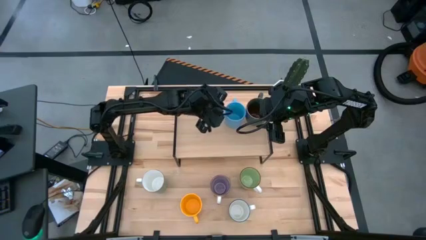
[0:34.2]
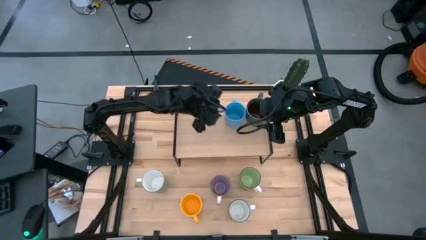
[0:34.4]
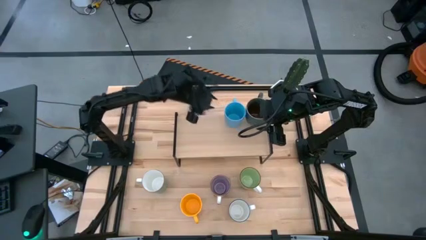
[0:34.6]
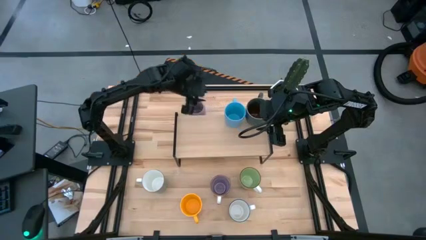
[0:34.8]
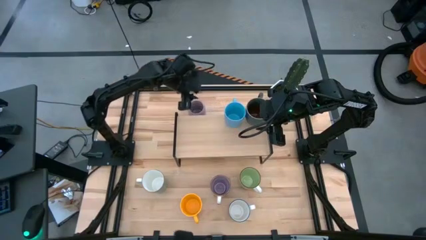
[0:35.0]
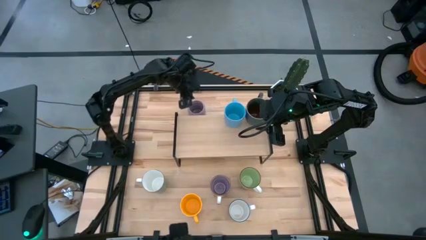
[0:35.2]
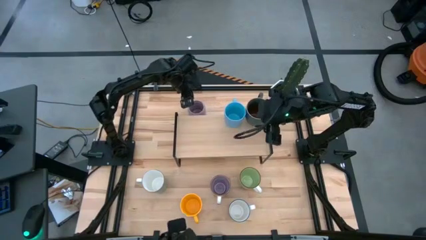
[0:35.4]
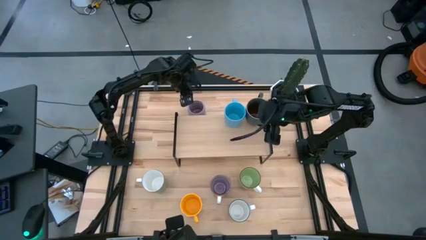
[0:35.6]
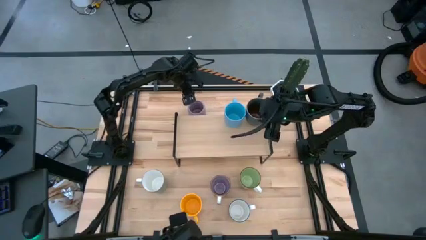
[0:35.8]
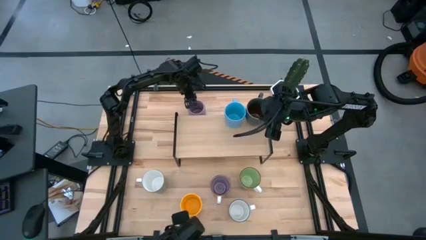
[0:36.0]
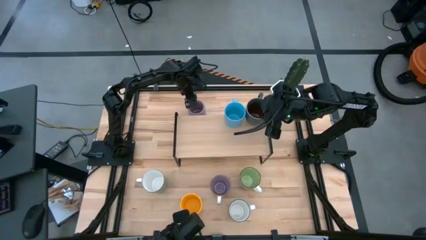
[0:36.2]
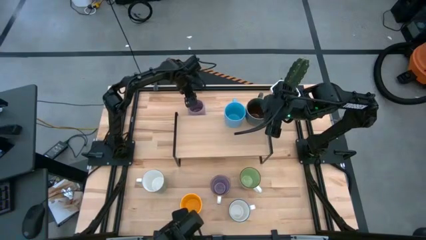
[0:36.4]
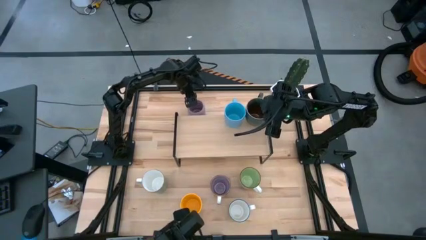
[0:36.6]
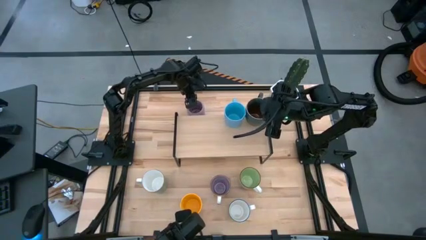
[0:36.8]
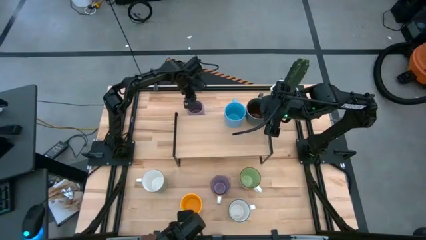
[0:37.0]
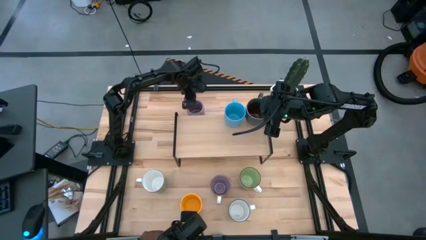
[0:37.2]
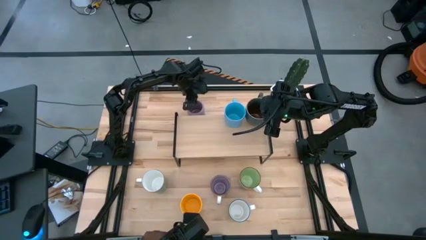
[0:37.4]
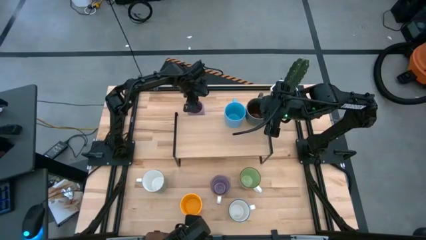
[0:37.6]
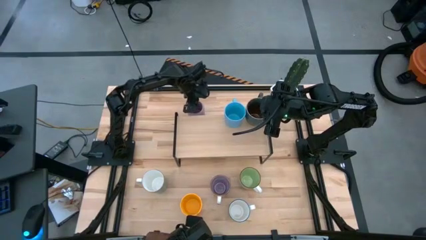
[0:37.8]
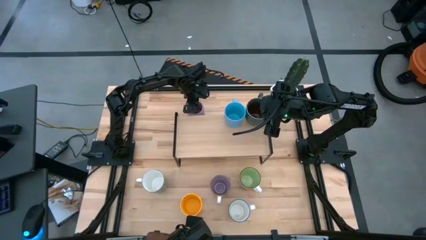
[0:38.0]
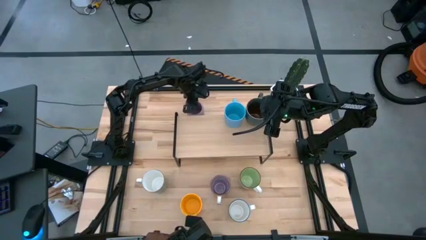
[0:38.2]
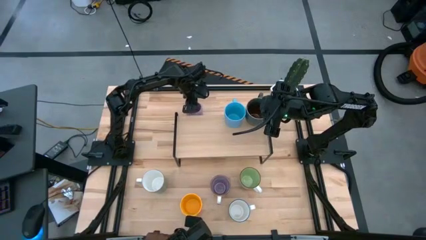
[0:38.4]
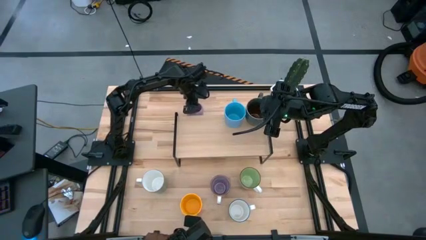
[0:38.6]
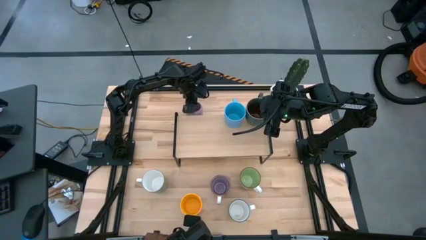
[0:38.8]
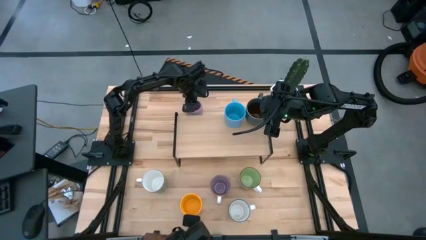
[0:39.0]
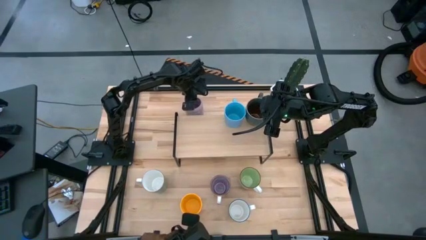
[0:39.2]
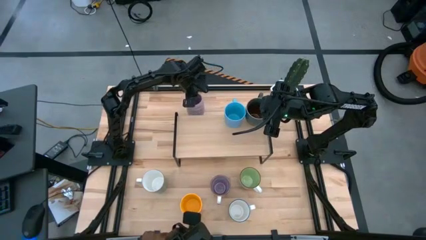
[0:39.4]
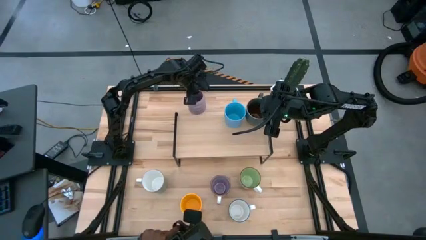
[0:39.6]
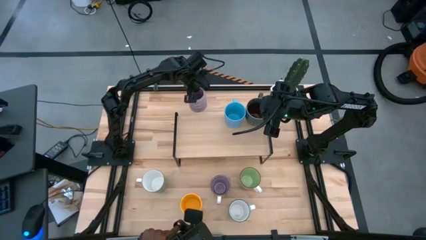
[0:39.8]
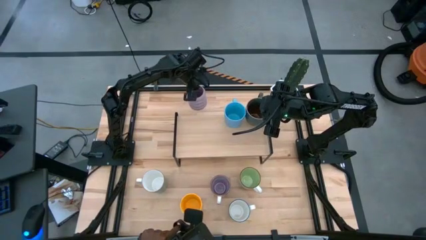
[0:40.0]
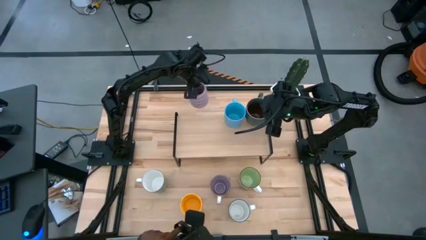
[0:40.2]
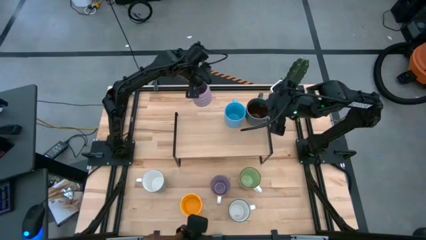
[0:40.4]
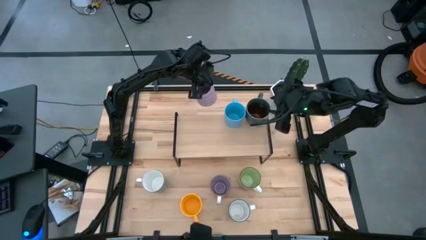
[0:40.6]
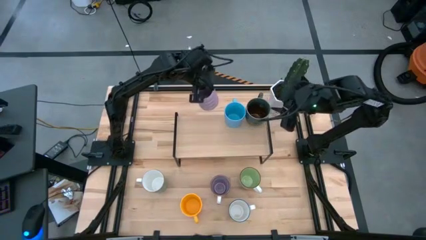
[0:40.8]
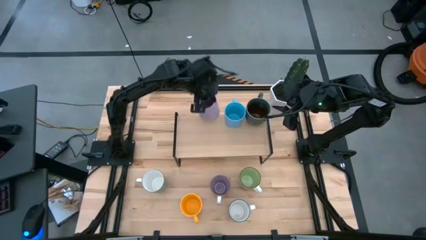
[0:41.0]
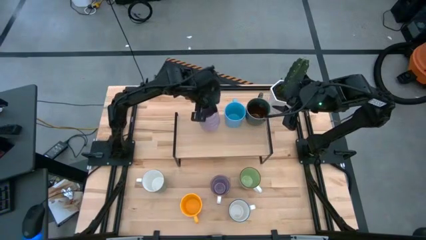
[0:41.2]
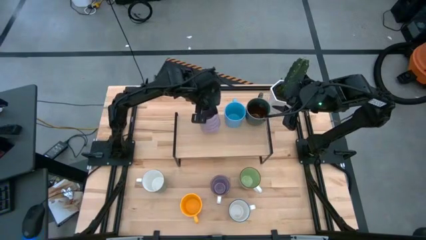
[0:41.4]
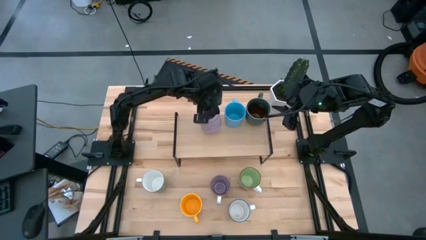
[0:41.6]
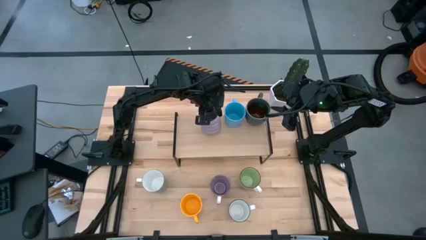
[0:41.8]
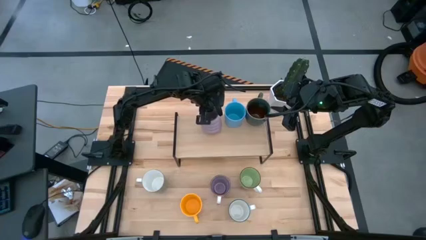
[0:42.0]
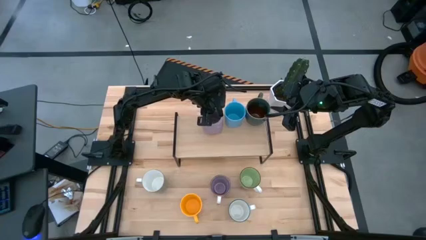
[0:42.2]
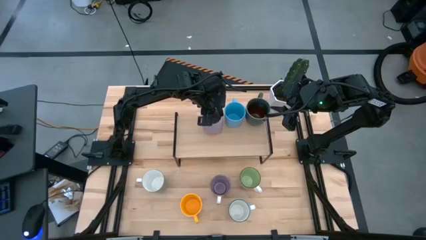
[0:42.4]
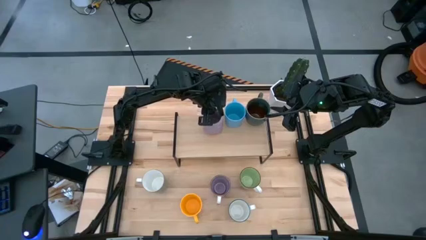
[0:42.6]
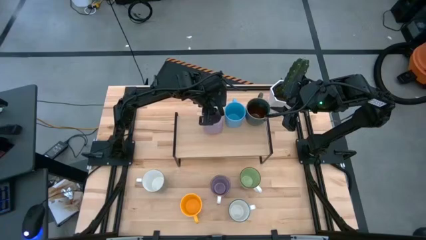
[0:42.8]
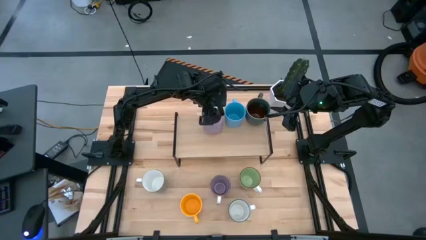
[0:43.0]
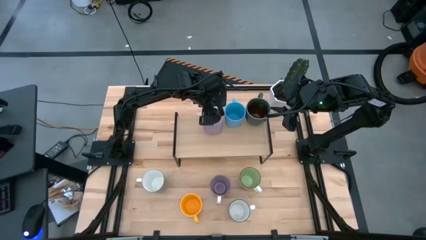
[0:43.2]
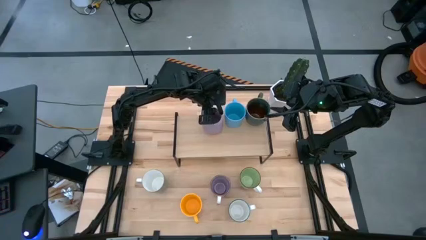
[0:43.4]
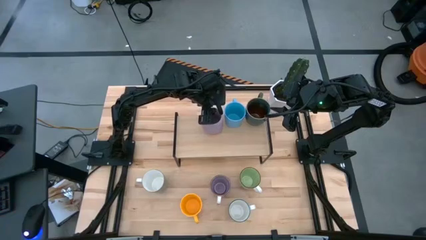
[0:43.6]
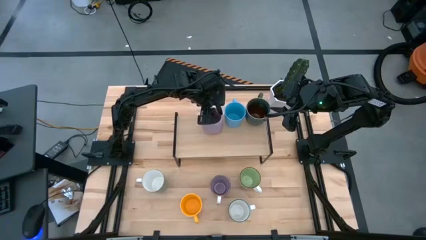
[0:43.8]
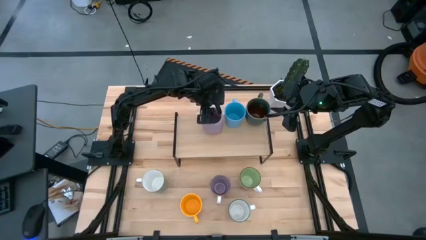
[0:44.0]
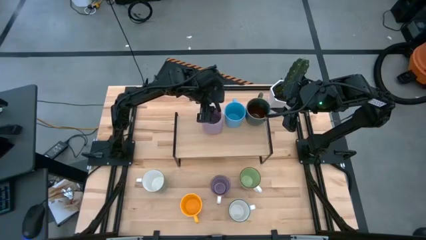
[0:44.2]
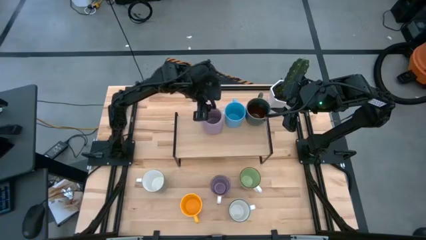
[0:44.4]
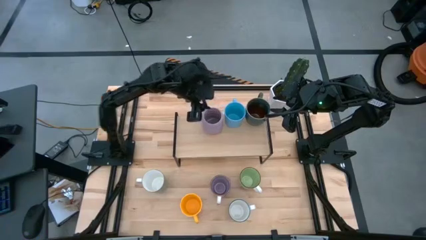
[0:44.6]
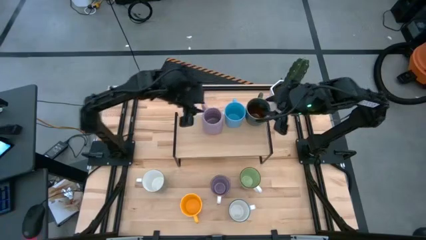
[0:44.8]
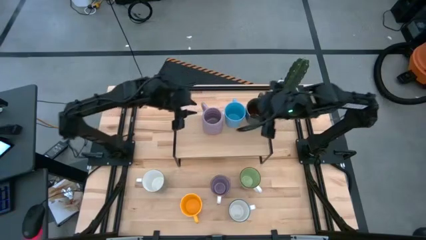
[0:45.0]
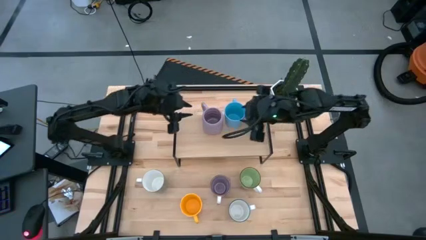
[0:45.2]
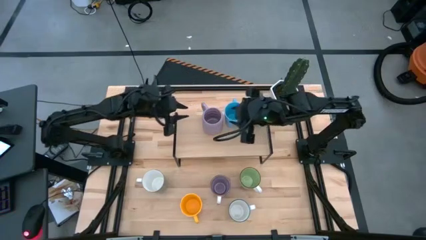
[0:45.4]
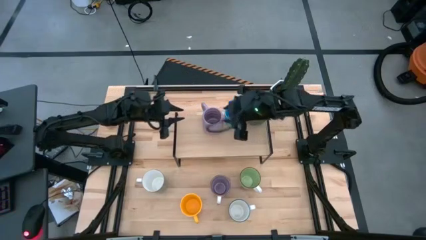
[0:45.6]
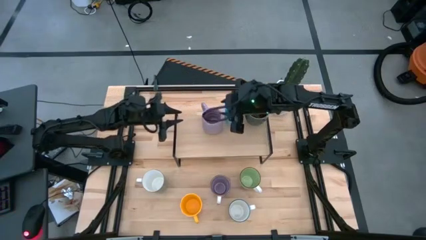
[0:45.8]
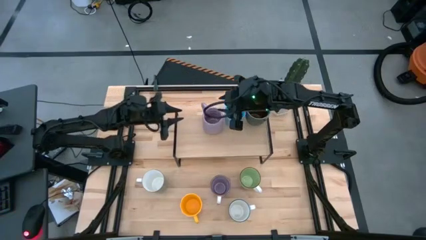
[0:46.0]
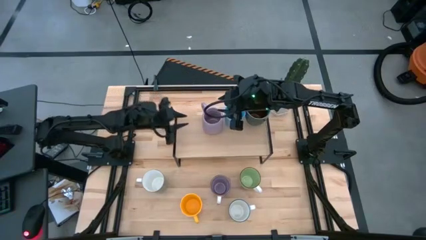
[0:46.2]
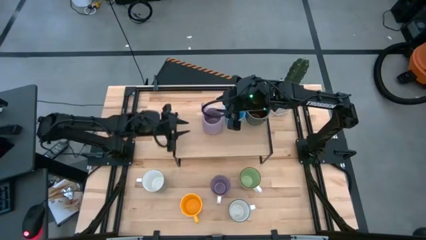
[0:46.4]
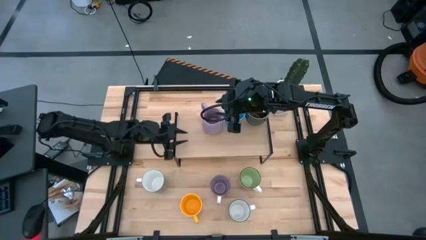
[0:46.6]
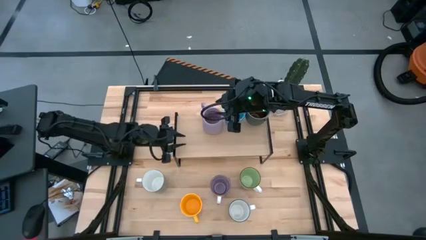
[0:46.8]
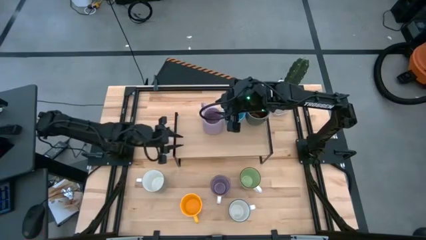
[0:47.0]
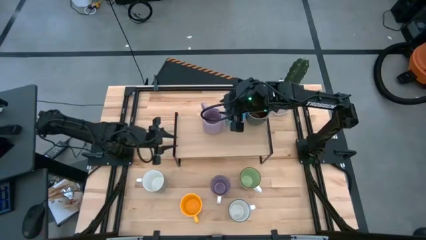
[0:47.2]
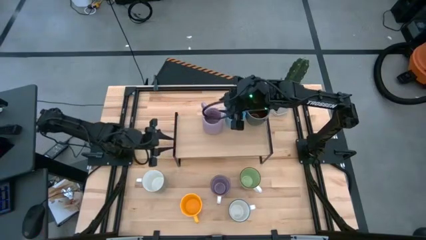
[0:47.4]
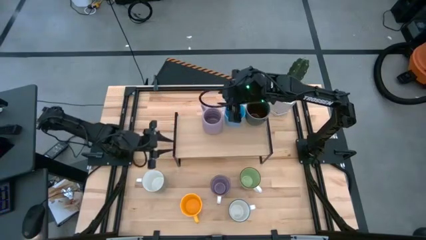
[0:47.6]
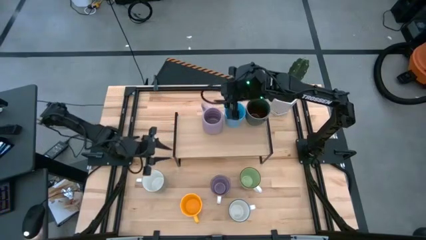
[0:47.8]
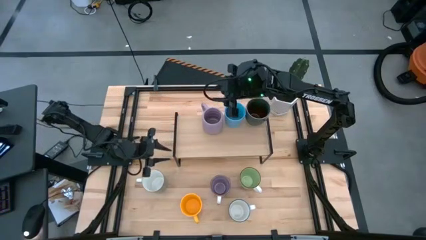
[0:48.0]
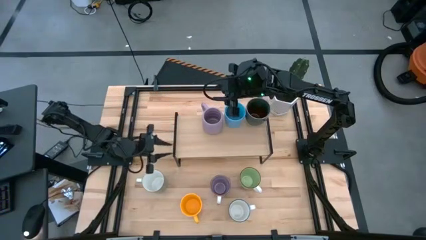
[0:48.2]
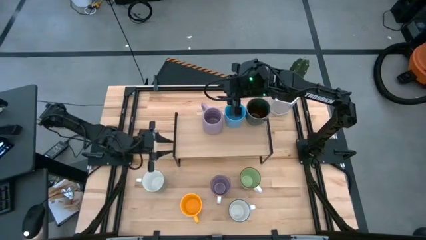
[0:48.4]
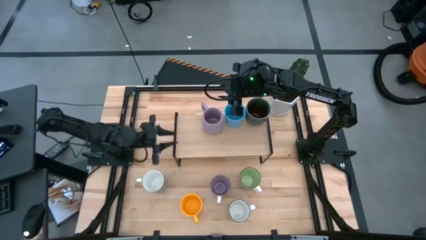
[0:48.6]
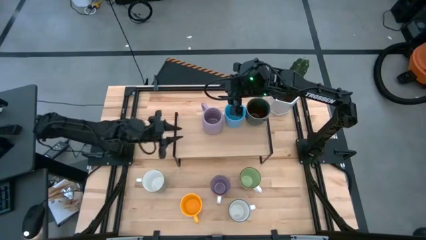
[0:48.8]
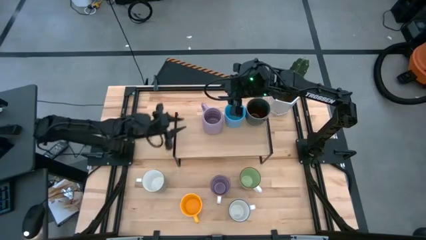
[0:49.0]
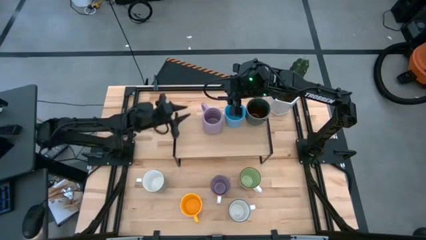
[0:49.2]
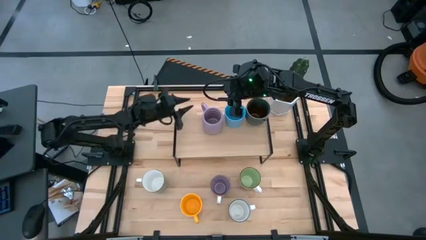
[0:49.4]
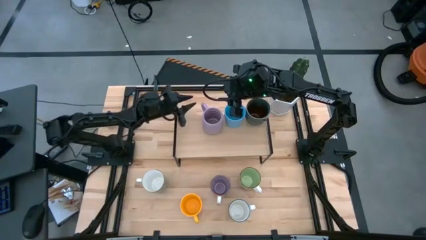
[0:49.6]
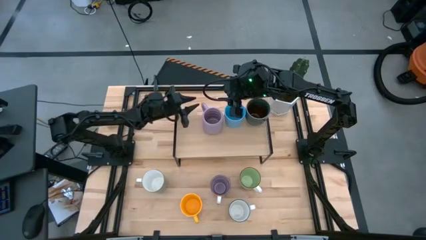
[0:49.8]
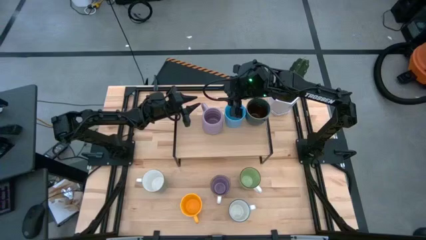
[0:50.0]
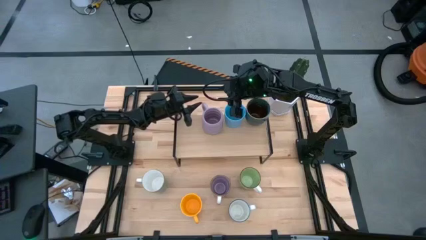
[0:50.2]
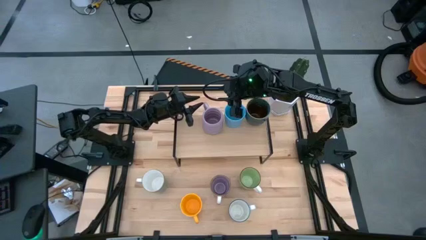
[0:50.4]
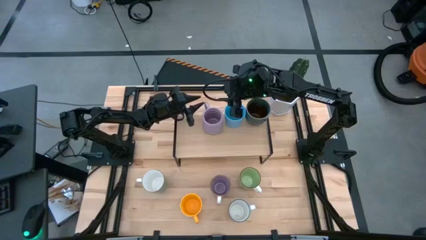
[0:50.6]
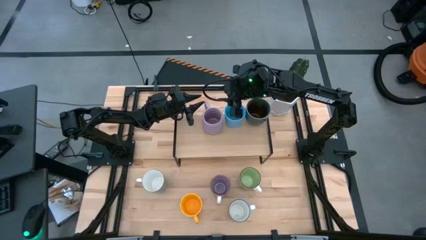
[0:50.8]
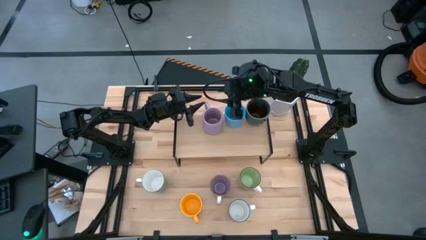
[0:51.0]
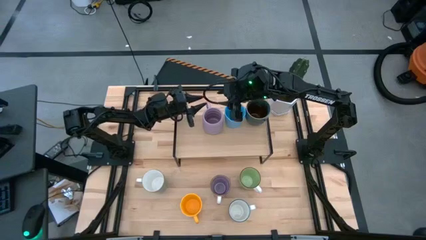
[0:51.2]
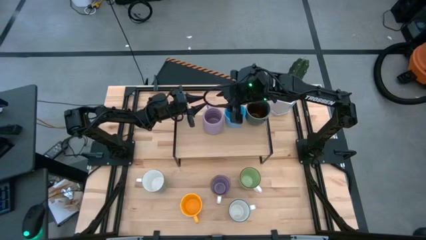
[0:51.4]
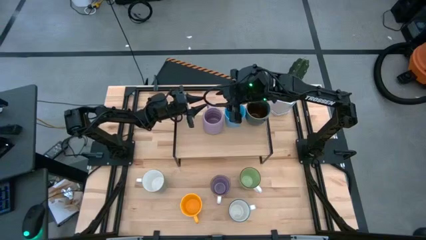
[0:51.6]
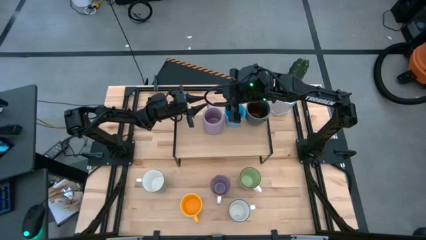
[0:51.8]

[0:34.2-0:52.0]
Task: Place coffee mugs
Put the purple mug on the shelf
